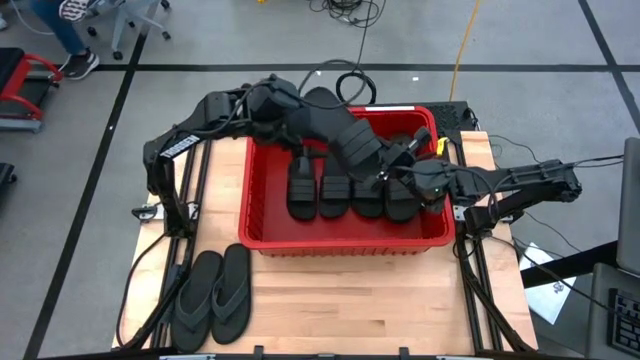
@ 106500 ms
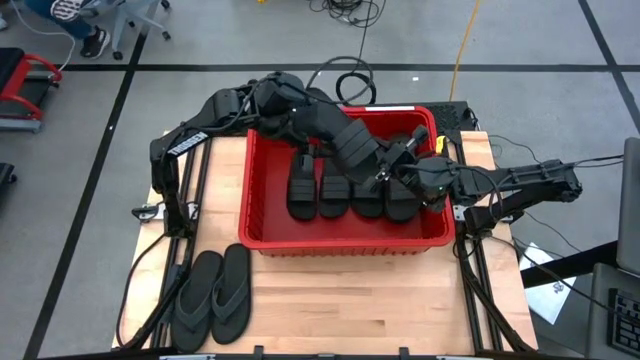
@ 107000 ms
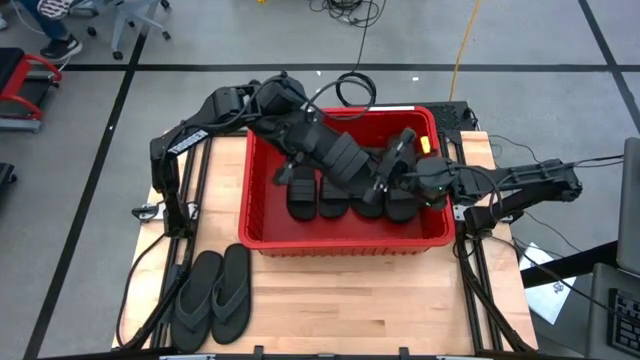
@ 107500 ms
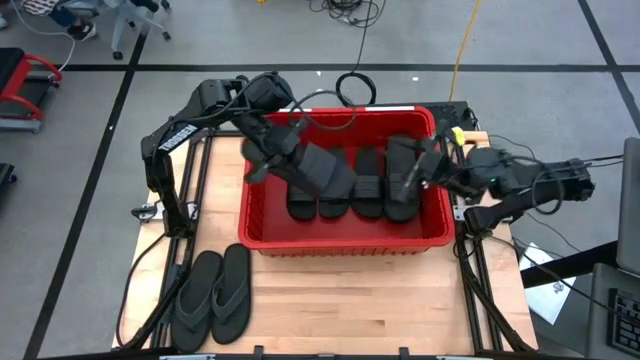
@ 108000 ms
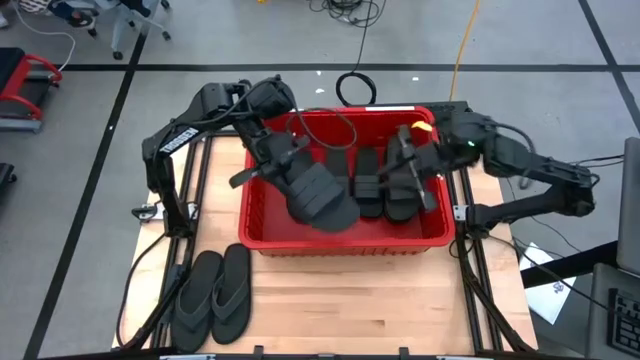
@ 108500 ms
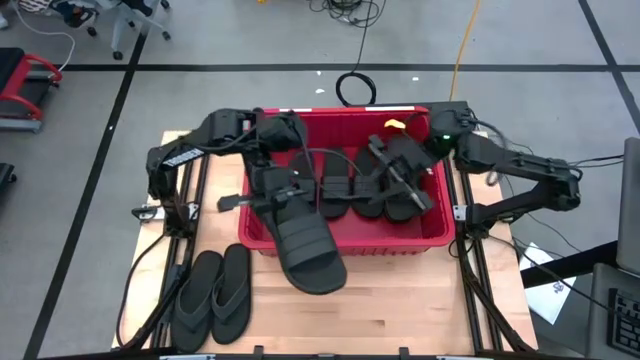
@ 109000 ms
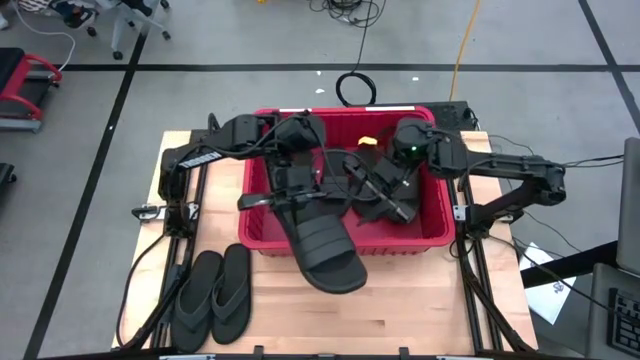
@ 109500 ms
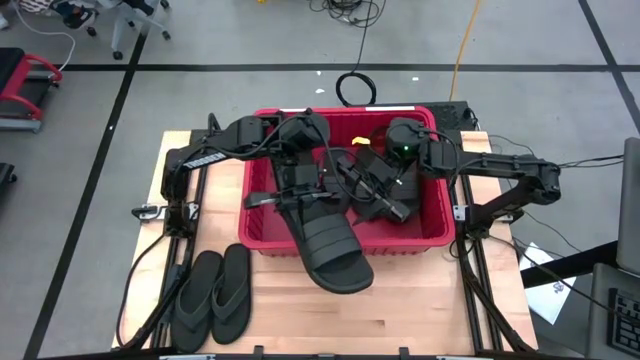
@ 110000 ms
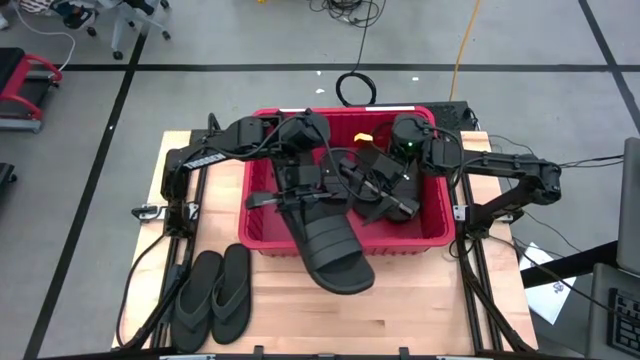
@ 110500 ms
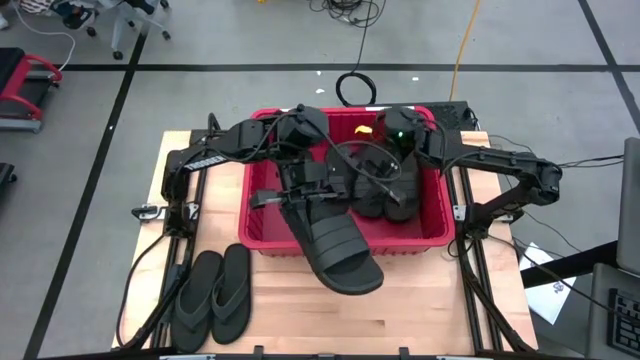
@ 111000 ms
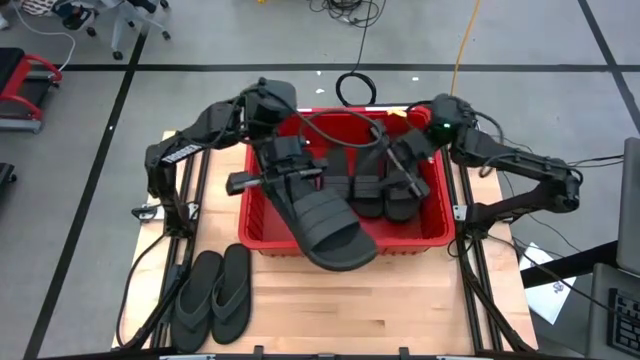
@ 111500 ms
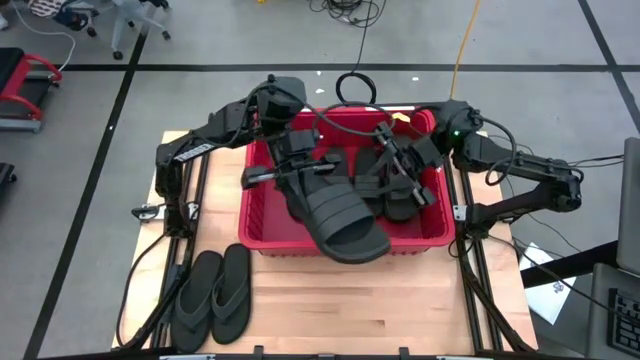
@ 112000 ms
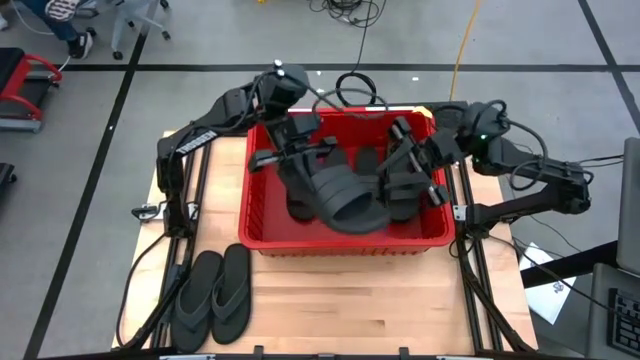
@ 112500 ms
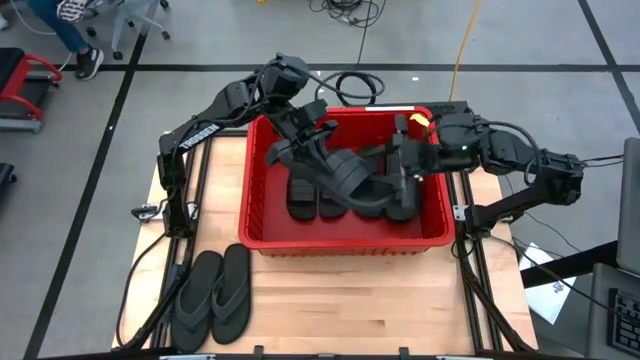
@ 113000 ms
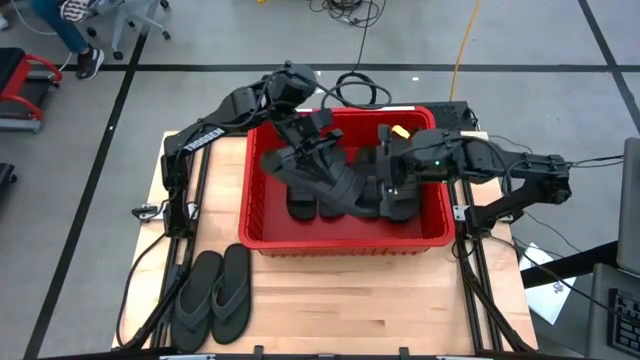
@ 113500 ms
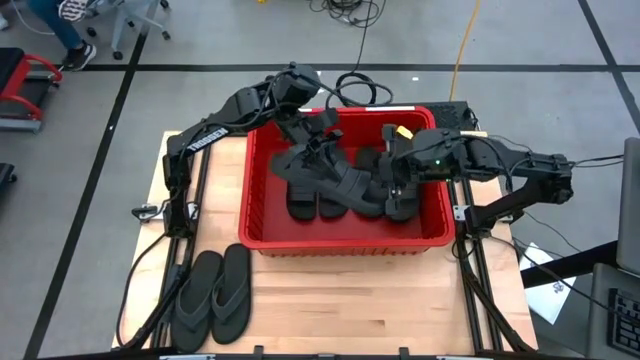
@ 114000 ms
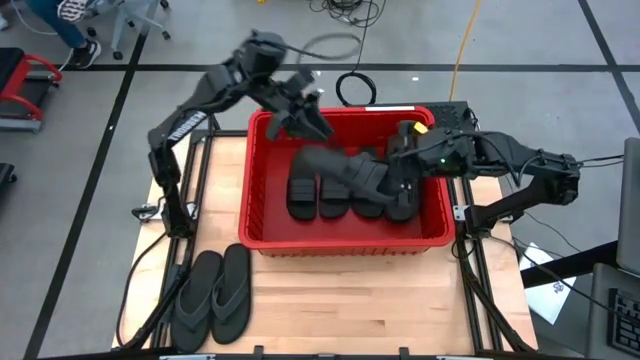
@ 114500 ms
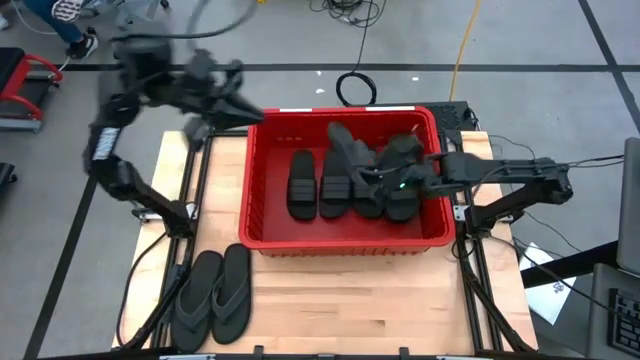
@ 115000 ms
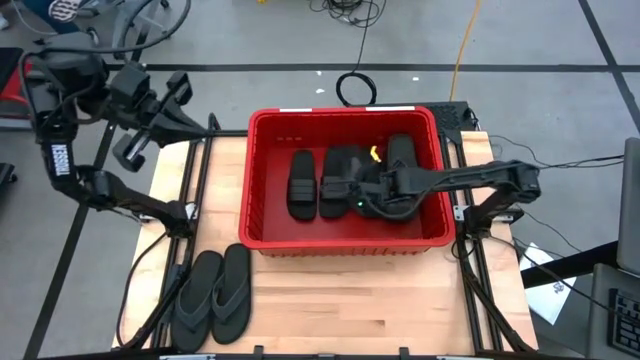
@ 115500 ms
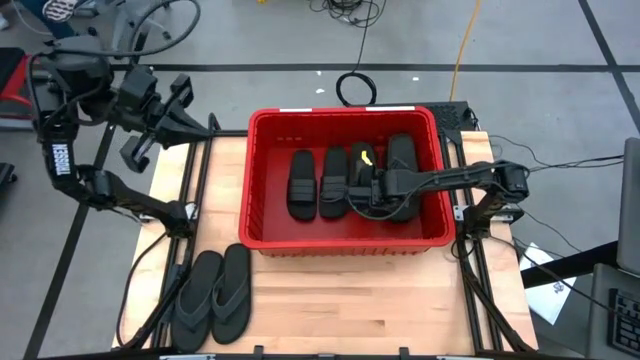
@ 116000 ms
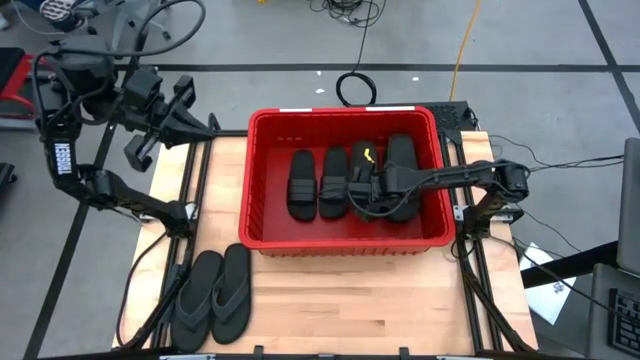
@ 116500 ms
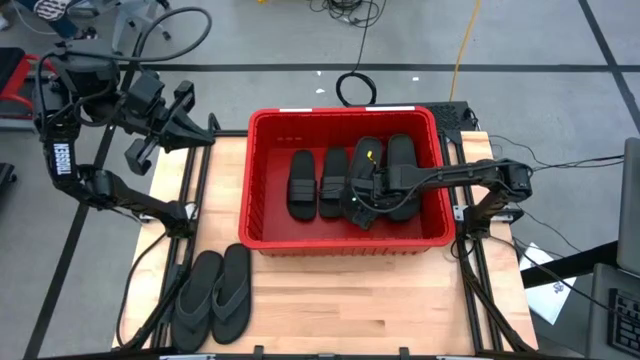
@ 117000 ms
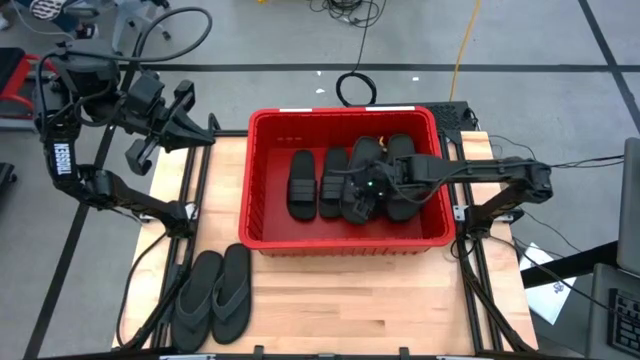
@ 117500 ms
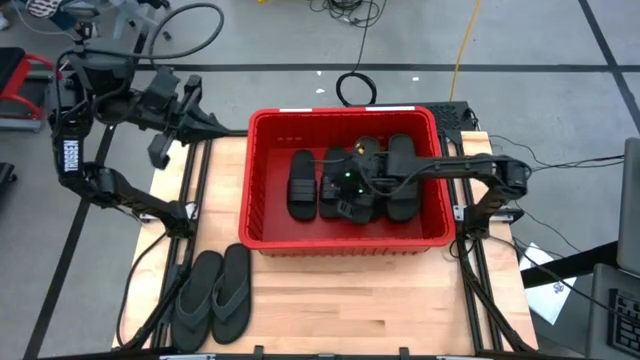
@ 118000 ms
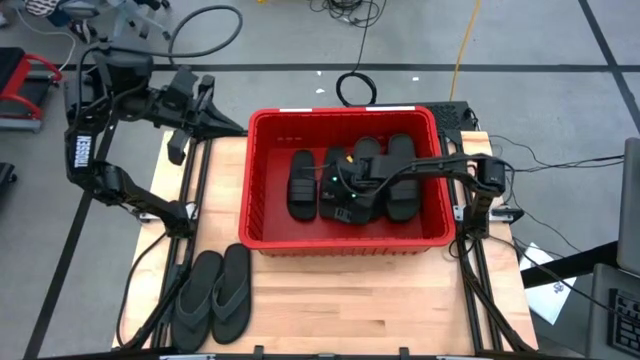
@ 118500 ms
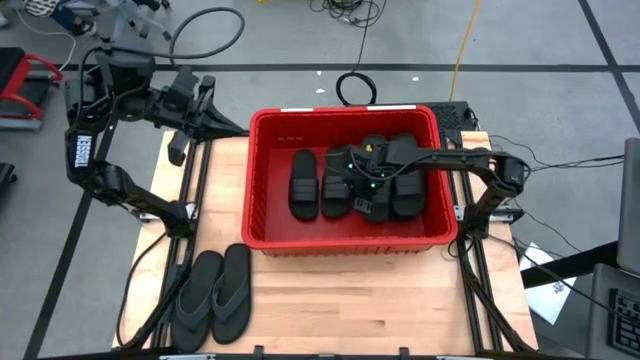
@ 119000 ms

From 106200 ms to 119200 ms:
Task: Pick and place slides into bin
Put the black slide into the red container

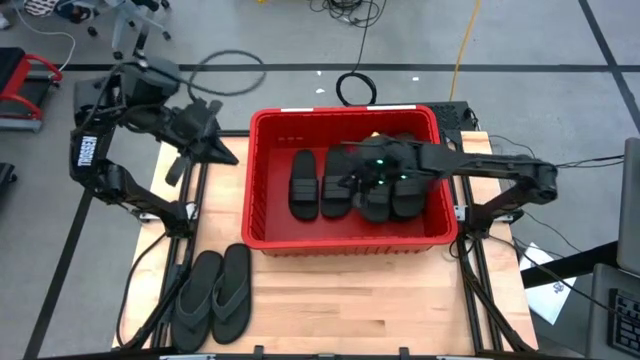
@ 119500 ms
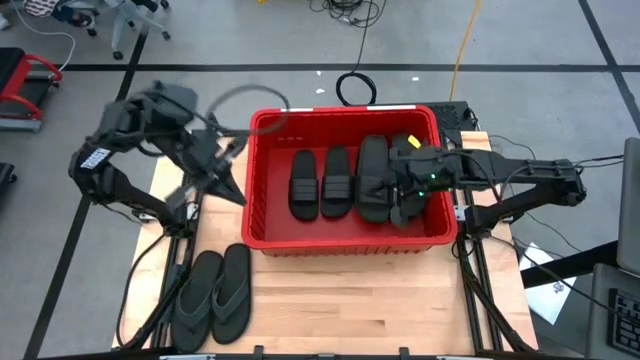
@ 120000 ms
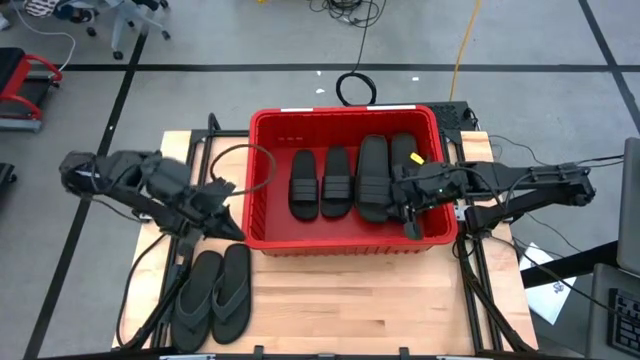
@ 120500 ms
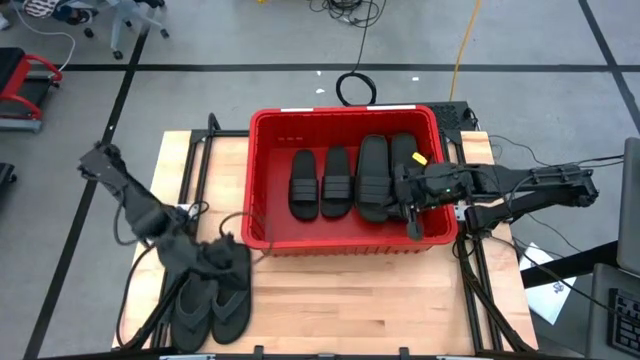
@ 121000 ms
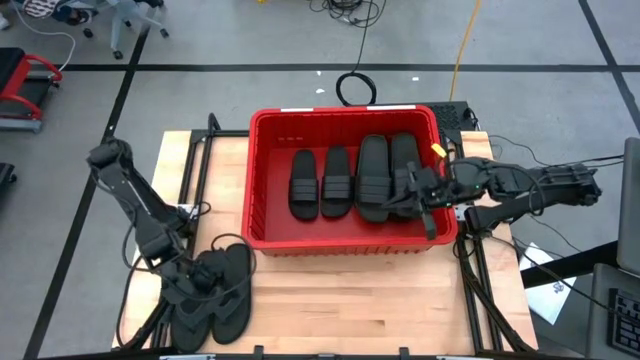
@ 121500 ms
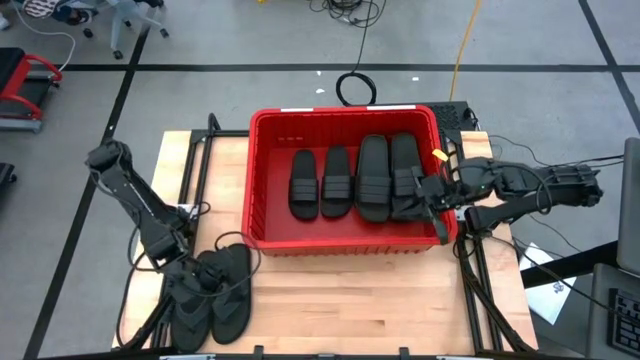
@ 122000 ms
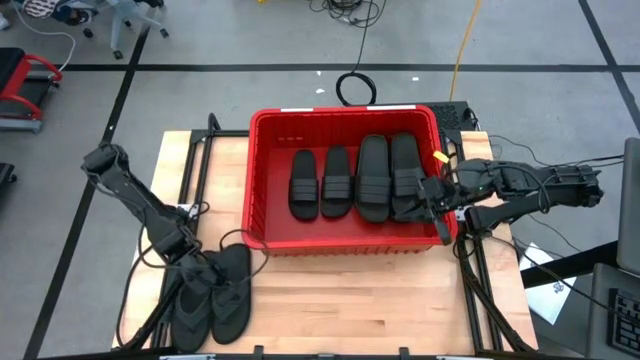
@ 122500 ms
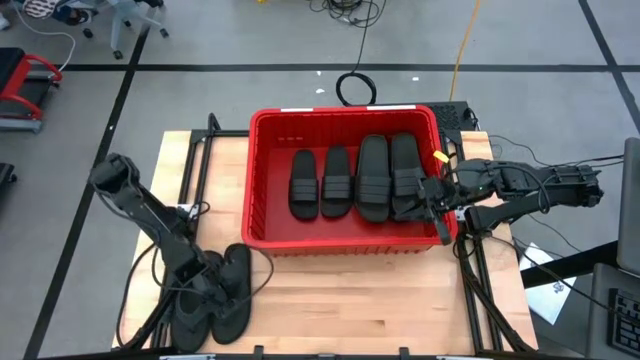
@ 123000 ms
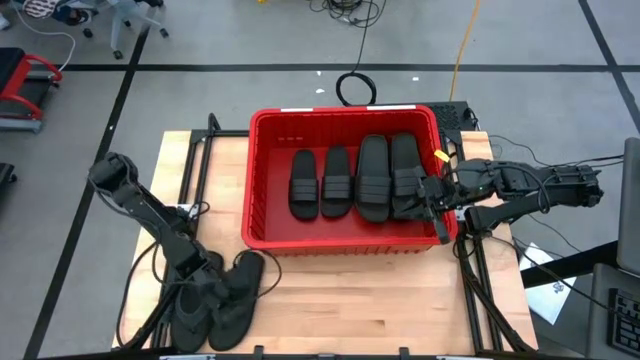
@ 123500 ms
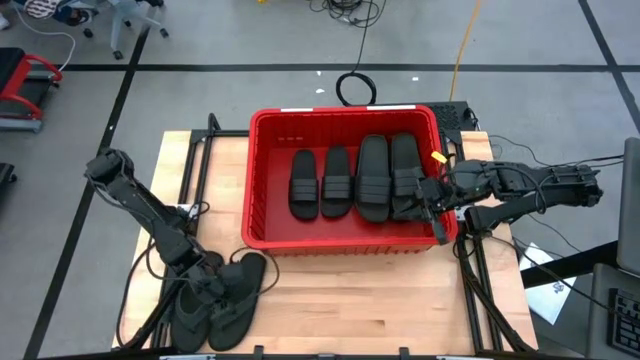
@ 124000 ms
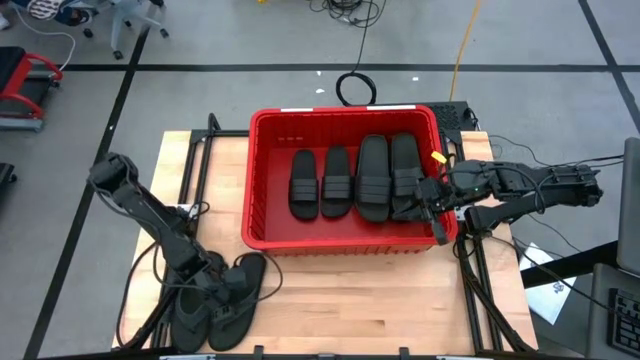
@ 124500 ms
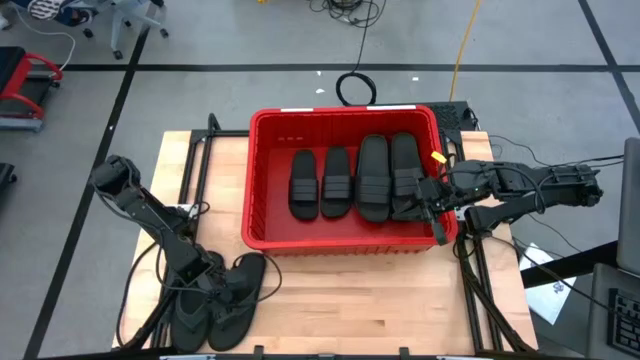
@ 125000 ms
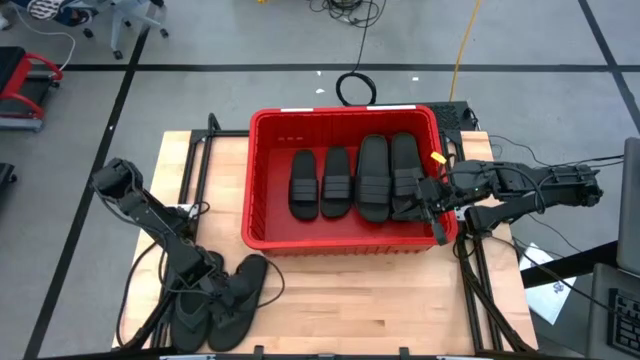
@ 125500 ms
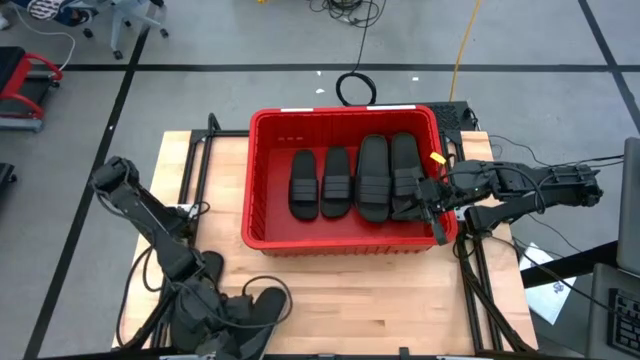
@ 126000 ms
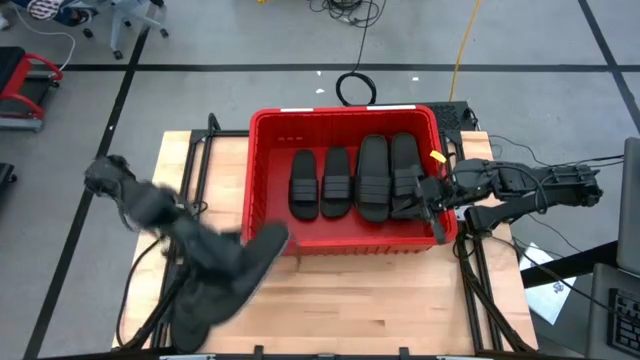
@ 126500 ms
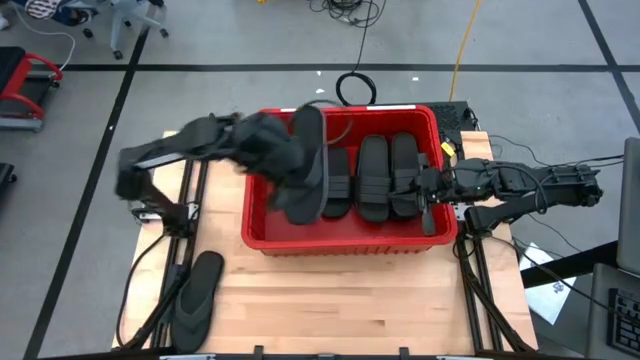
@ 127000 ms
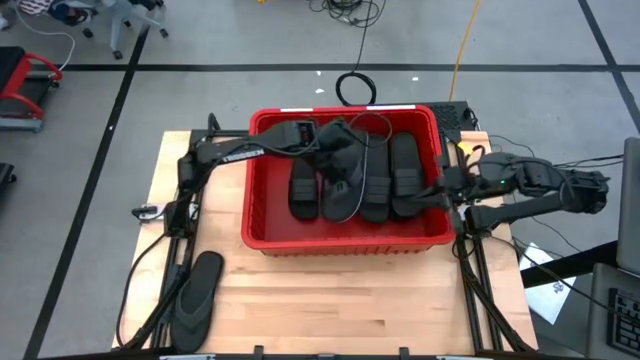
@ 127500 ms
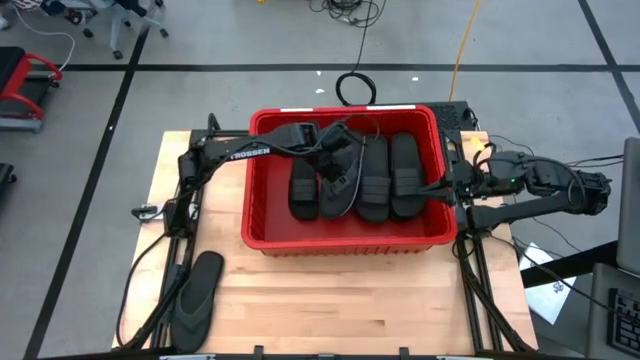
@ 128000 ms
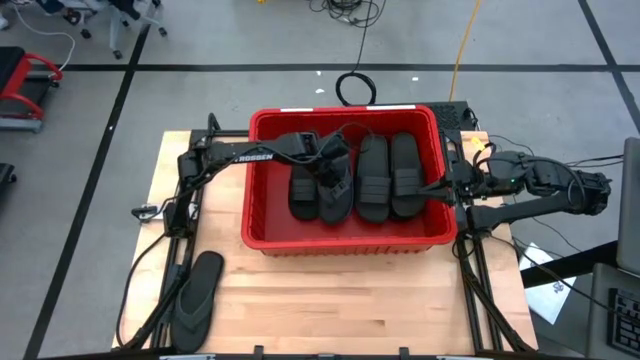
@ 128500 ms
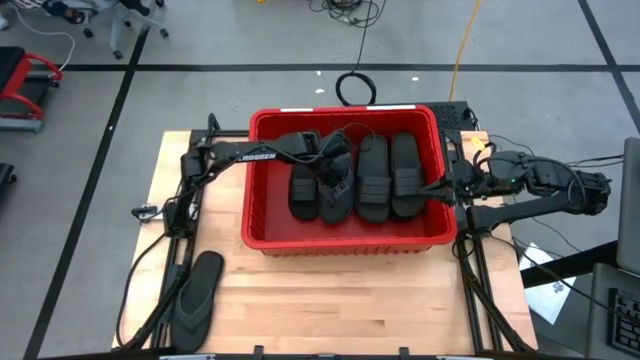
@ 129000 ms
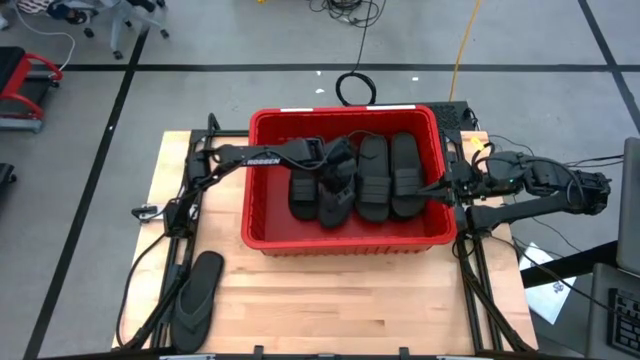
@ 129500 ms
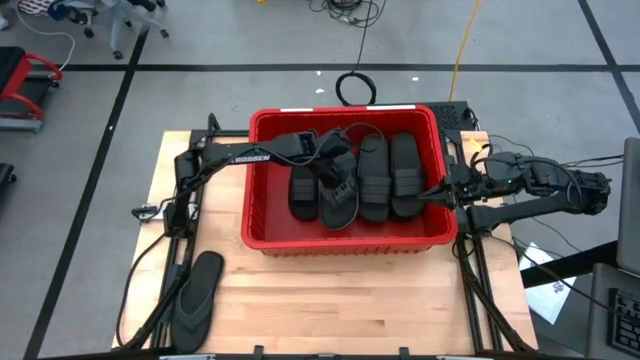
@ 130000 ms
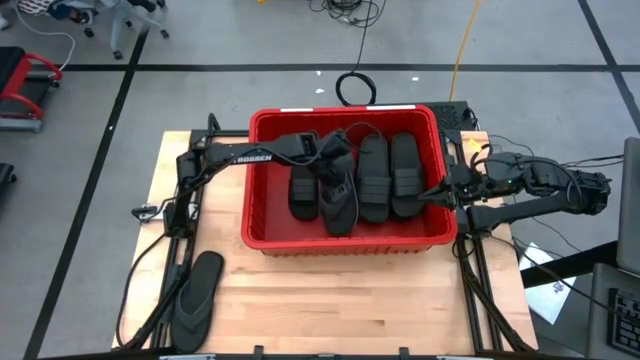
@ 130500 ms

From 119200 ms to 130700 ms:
Put the black slipper into the red container
